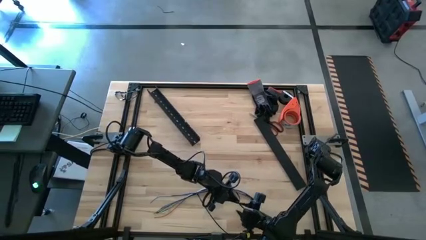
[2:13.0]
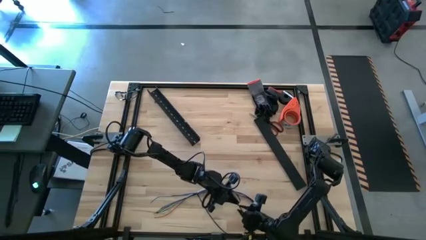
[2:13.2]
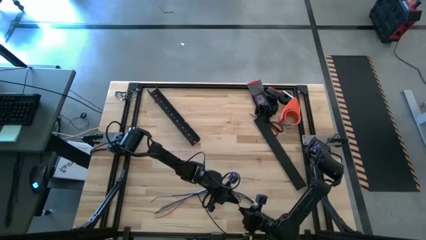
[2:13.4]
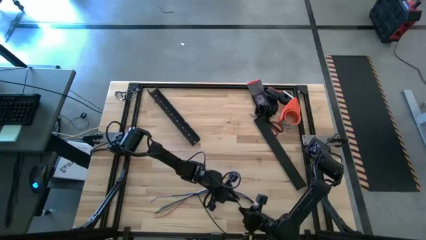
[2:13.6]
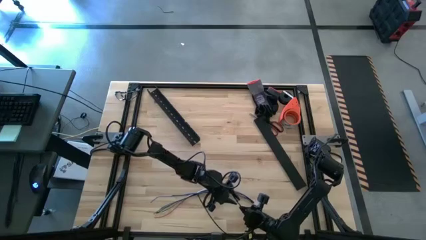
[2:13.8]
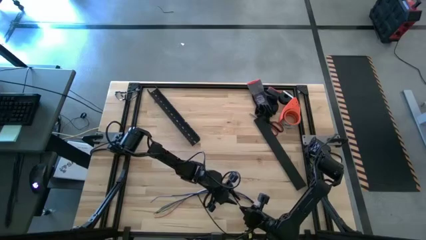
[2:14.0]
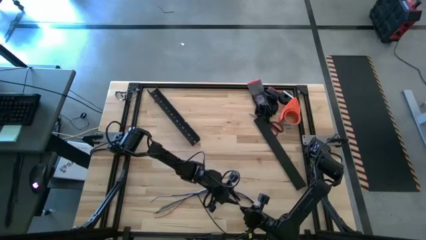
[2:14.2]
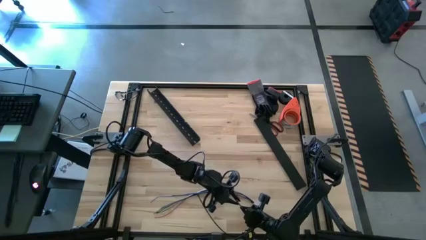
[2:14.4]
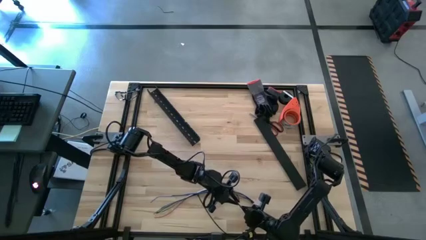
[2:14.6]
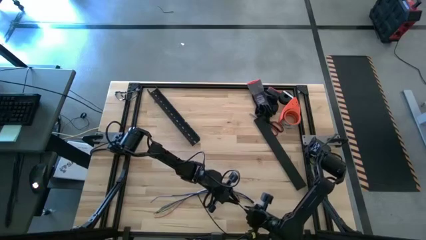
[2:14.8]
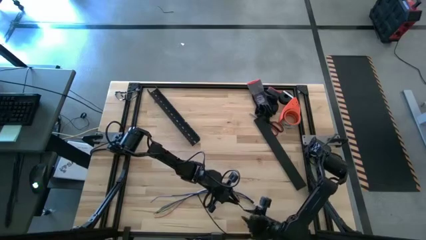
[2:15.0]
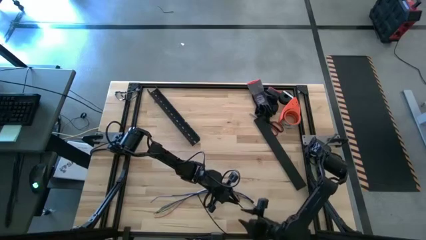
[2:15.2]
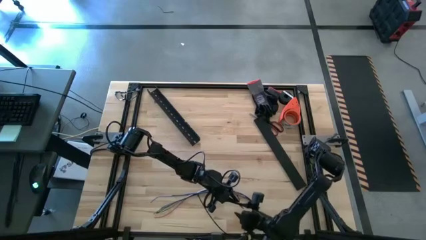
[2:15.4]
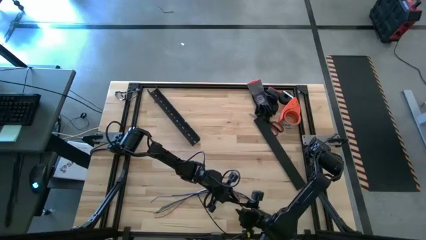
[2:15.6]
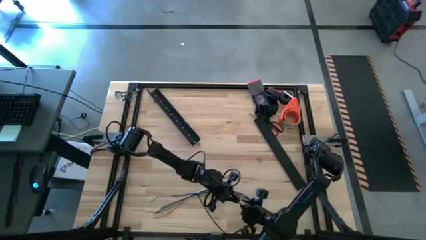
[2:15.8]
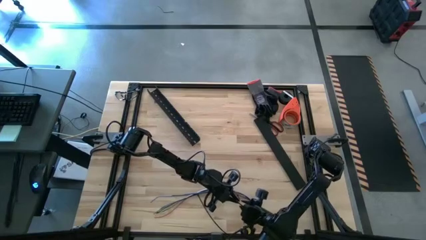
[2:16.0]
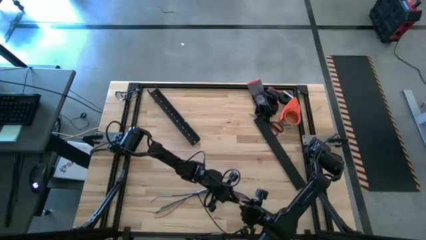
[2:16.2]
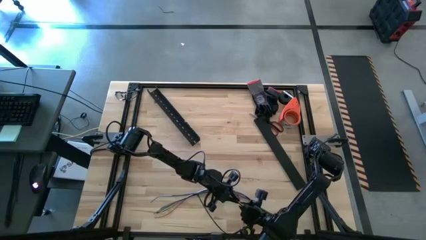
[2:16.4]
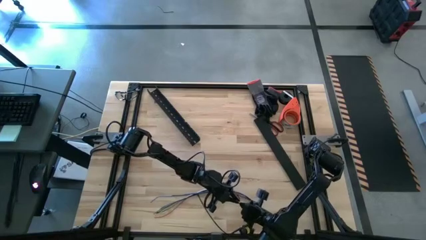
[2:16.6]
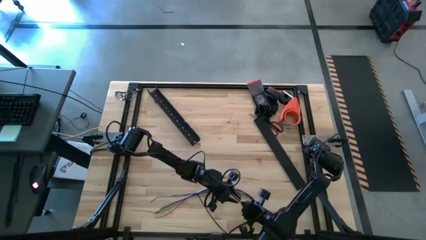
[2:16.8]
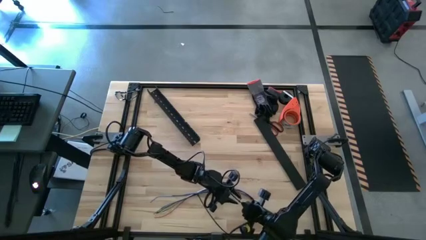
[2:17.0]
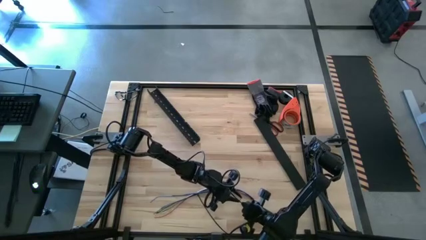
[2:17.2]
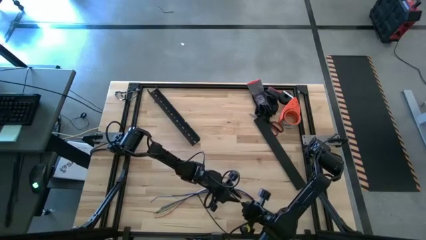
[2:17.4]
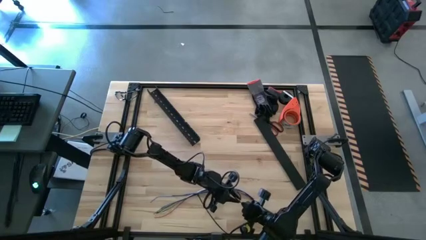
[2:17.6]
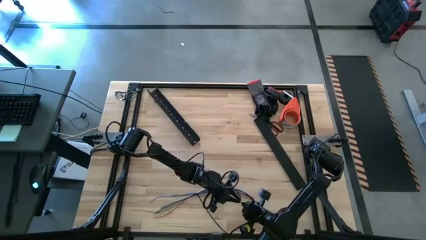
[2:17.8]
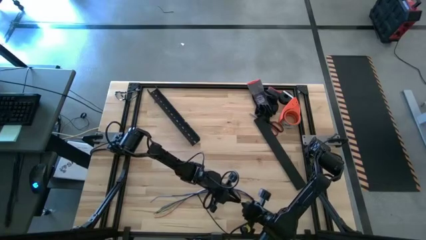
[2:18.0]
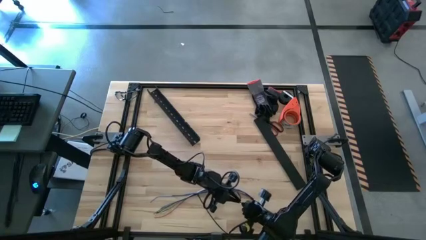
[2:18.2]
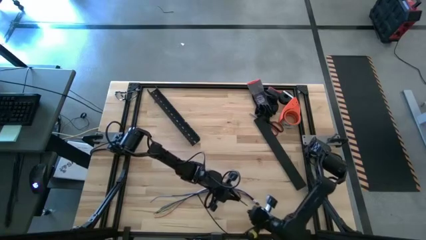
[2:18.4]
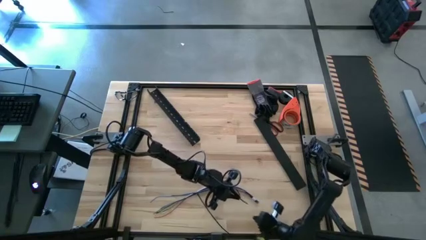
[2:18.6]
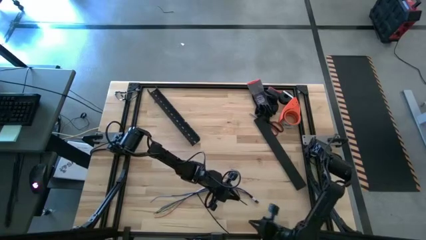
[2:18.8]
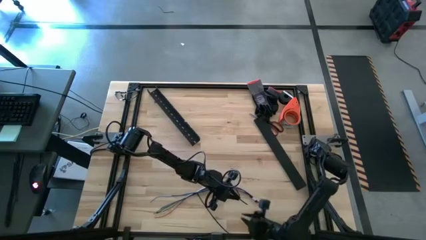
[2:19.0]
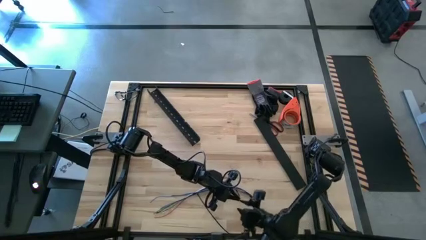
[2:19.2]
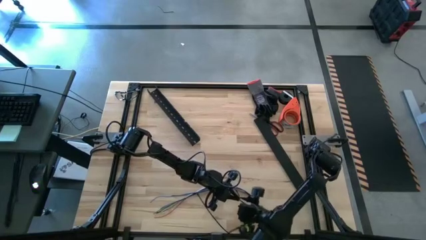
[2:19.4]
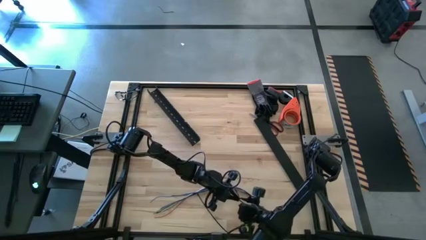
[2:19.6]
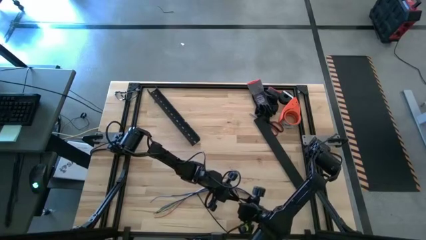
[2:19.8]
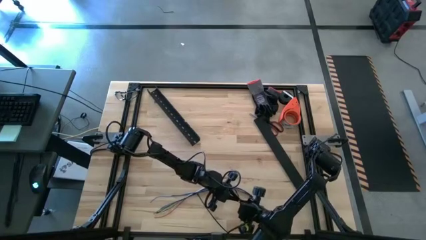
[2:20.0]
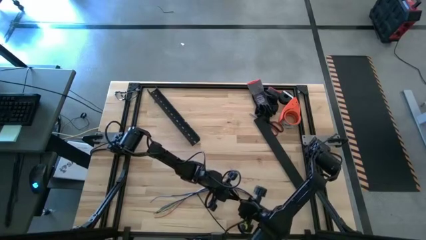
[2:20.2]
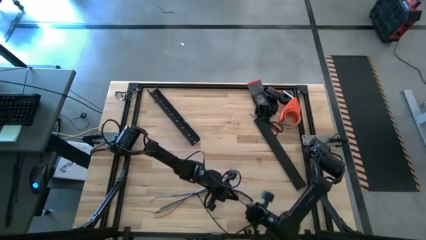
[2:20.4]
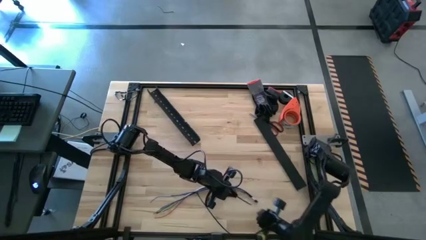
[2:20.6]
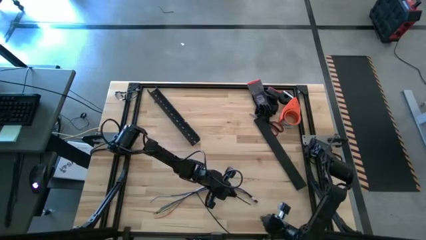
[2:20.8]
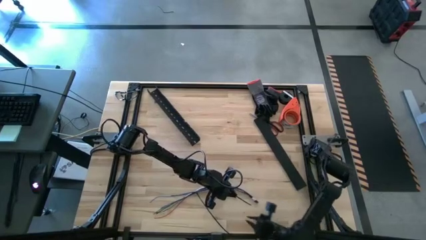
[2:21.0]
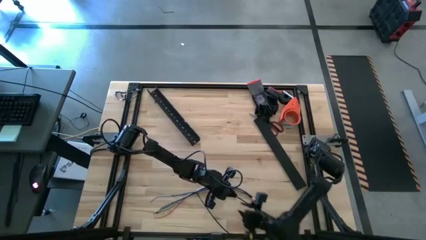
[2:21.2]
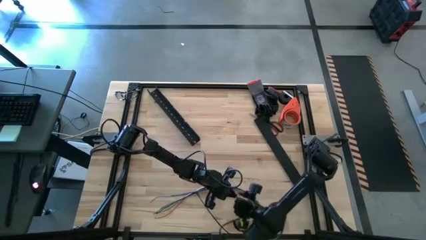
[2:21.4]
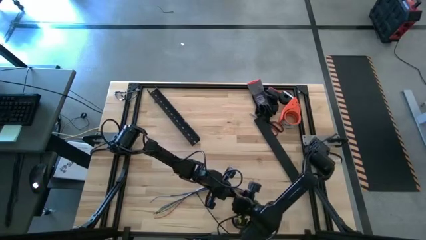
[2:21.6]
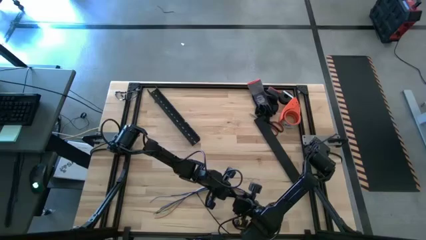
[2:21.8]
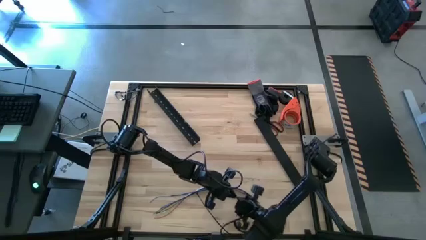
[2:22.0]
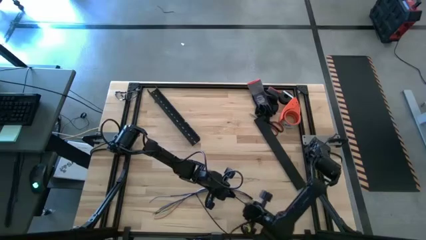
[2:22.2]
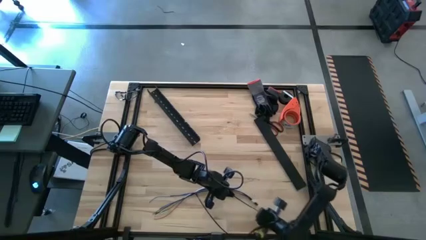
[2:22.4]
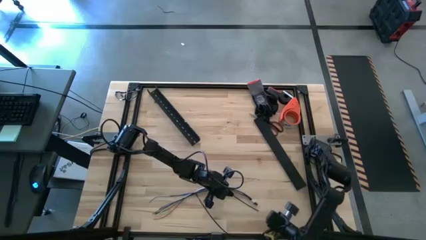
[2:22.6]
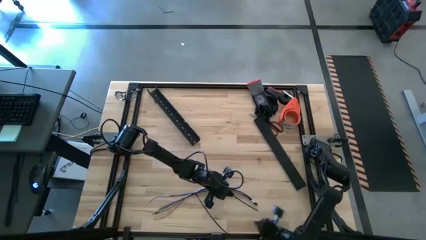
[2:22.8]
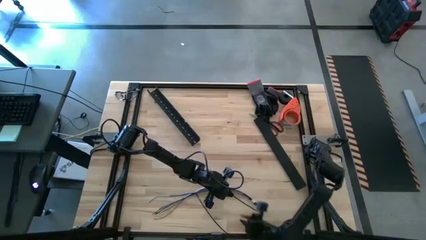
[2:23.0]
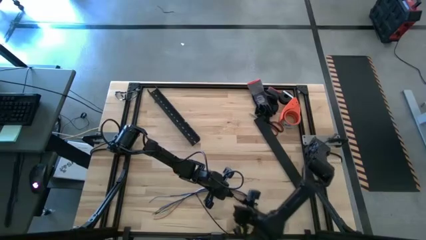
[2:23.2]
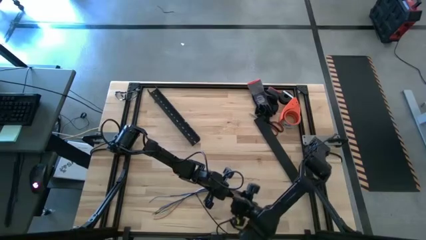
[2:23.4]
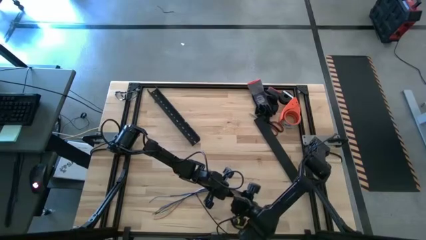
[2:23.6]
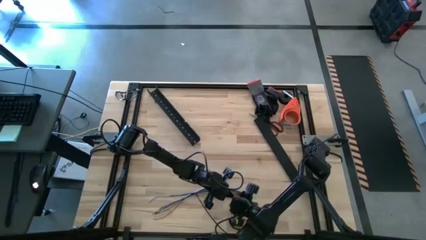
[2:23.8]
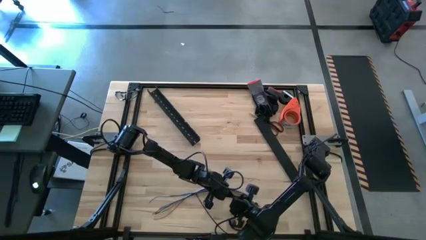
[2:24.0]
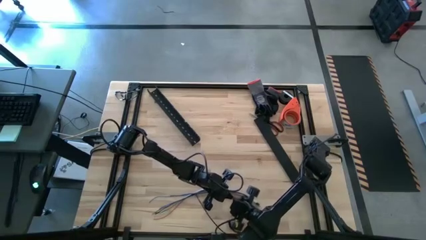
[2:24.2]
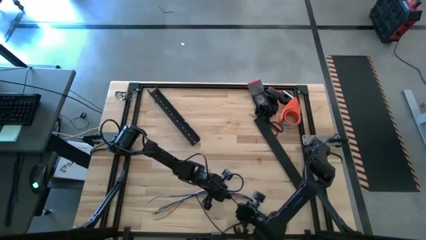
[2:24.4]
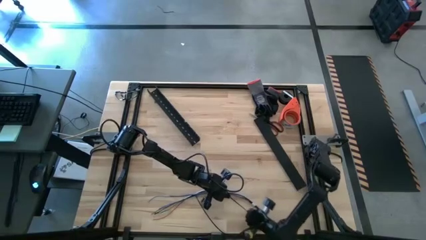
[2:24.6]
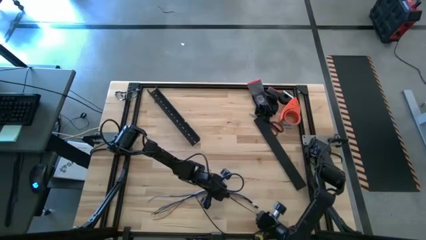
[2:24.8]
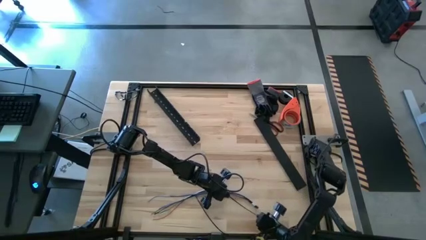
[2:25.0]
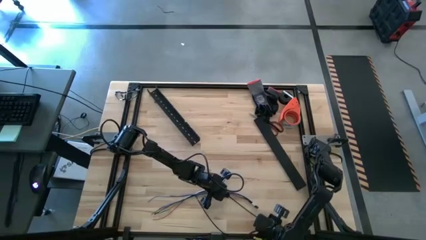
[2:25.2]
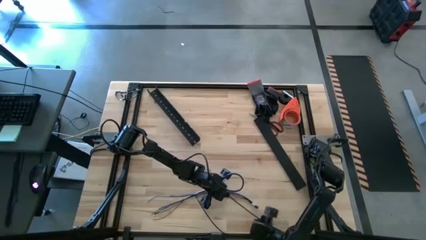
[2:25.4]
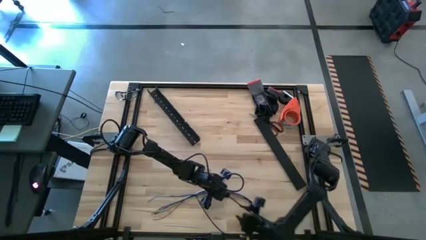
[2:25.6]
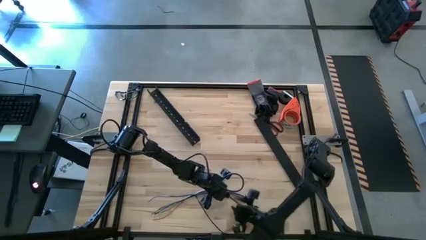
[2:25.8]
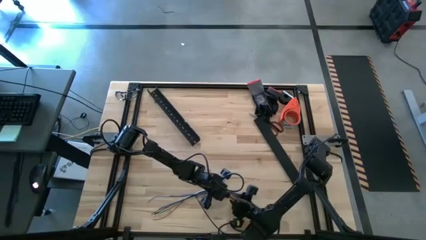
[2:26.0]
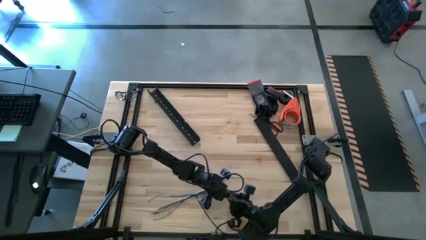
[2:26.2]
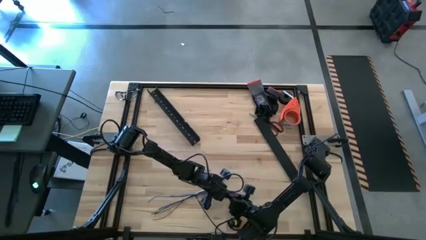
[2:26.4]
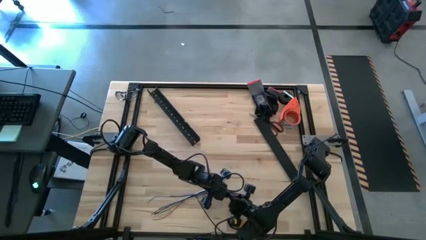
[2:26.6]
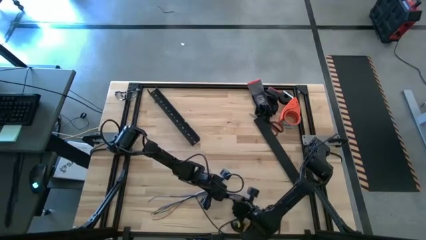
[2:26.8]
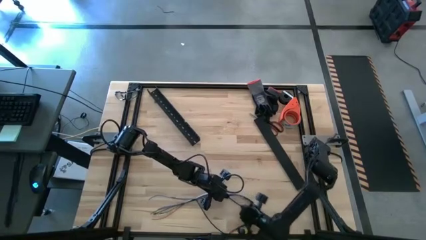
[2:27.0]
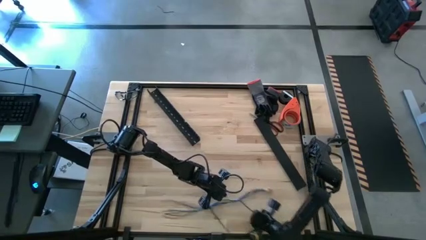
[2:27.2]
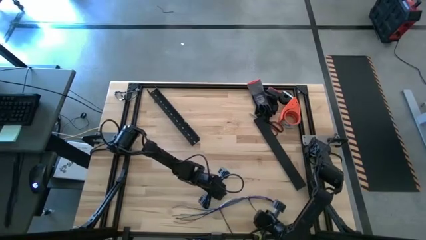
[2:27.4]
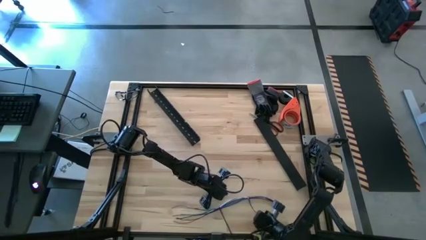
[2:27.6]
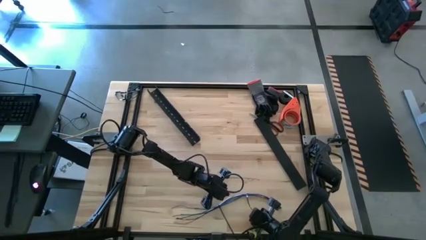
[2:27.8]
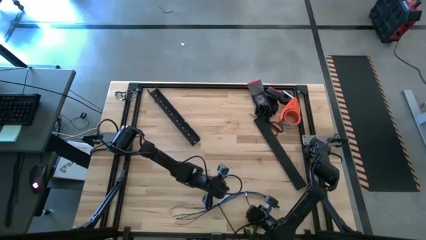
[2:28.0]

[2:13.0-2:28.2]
Task: Ziptie cables
Wrap the cable wires with the black zip tie

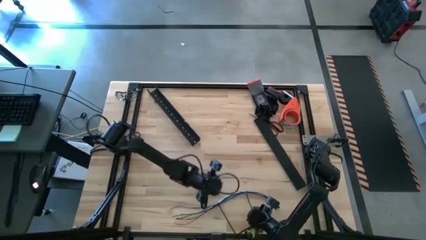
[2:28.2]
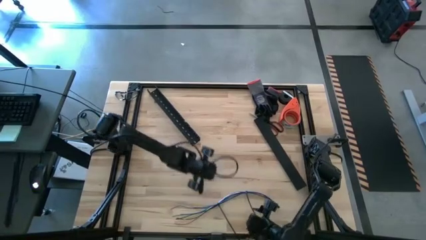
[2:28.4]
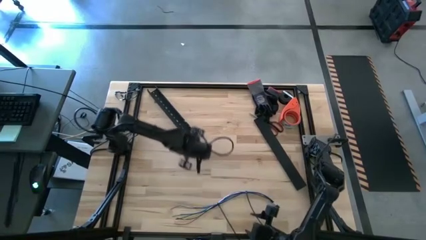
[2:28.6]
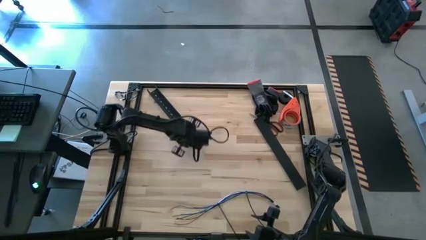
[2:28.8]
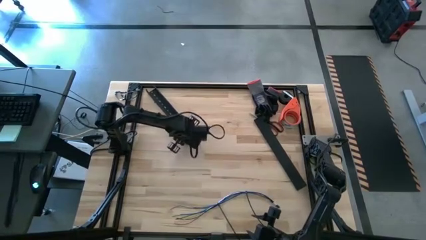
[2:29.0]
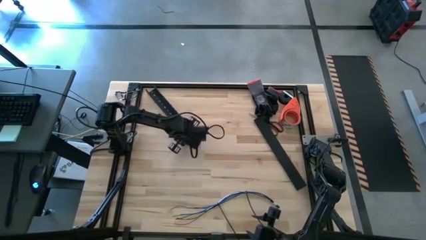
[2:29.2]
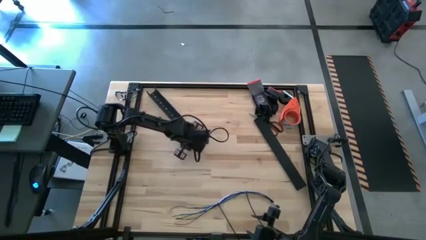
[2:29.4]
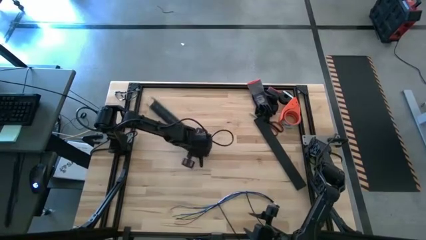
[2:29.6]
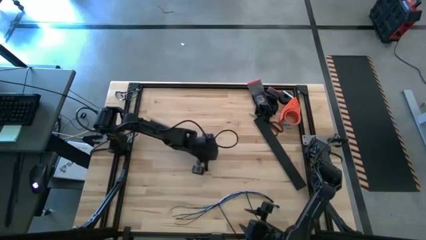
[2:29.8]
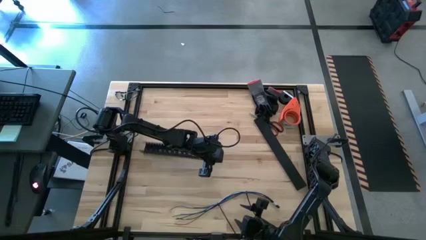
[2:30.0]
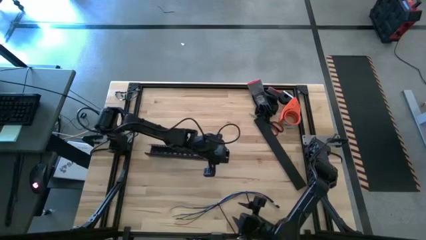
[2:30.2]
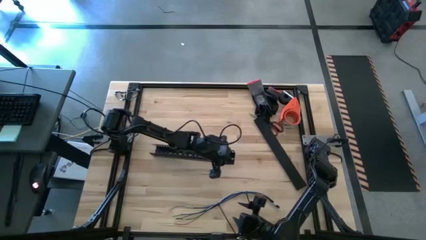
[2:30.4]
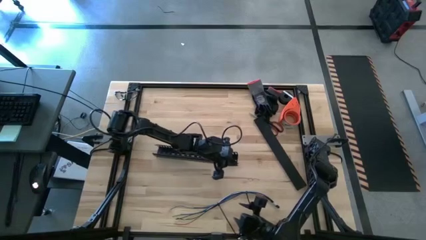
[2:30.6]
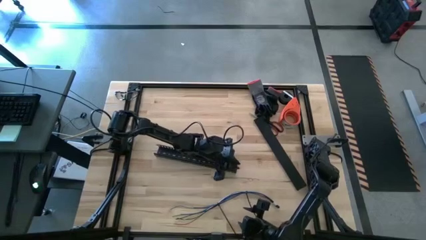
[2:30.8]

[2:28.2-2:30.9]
Move the black cable duct to the center of the table
